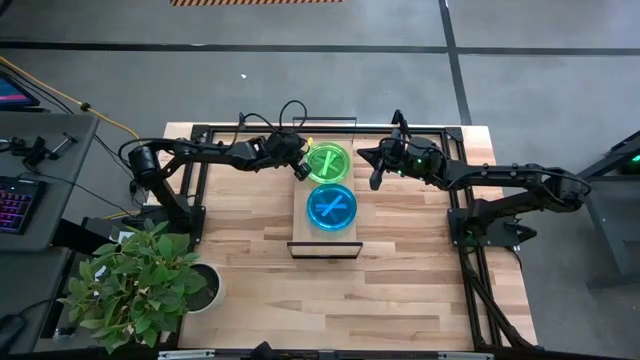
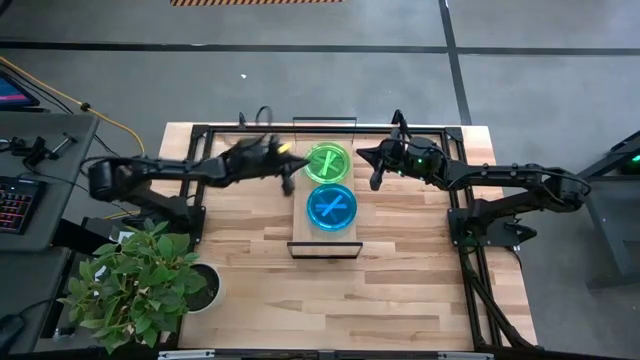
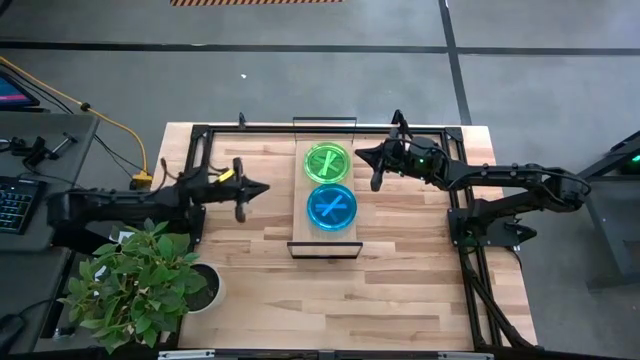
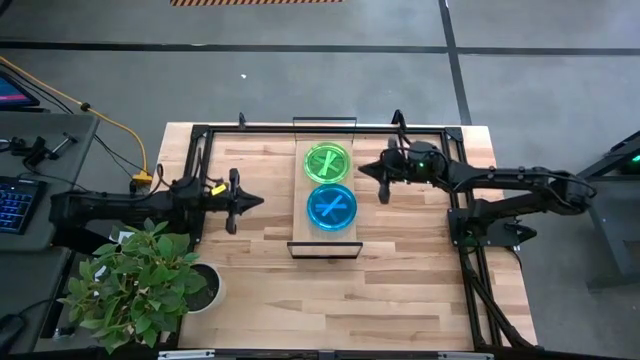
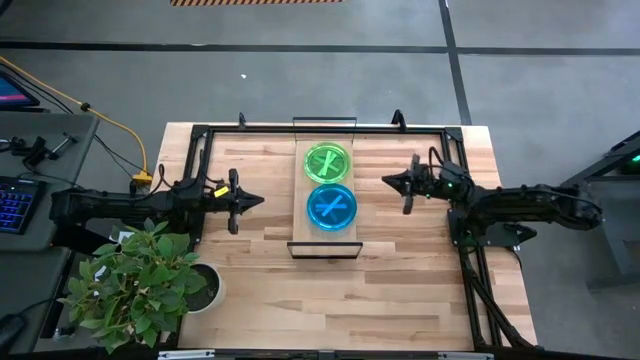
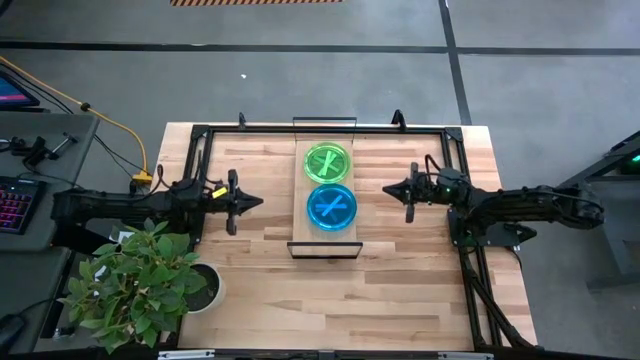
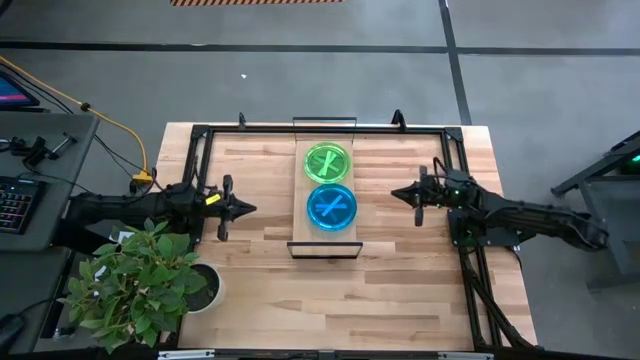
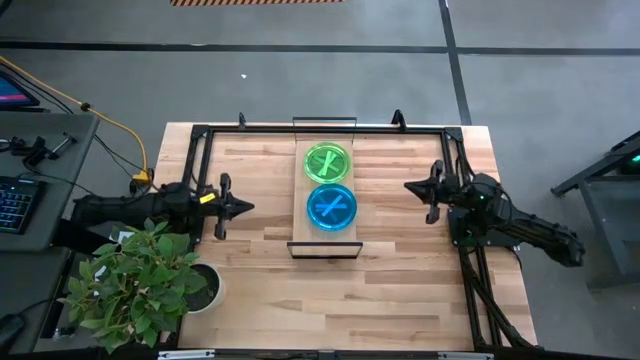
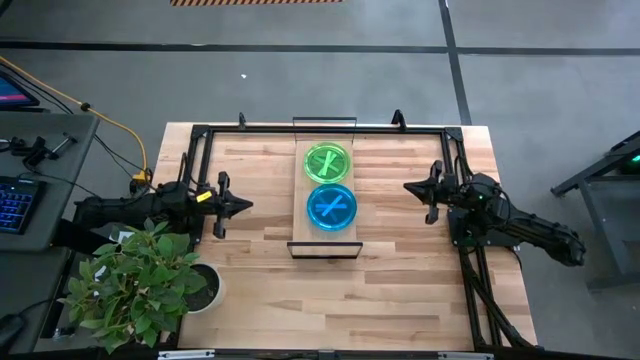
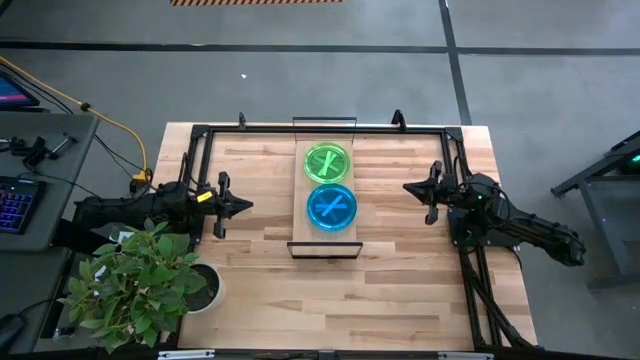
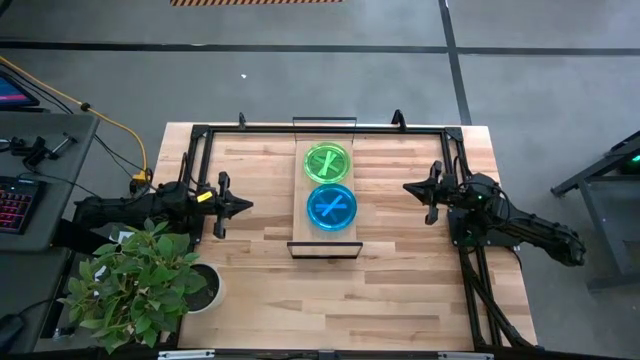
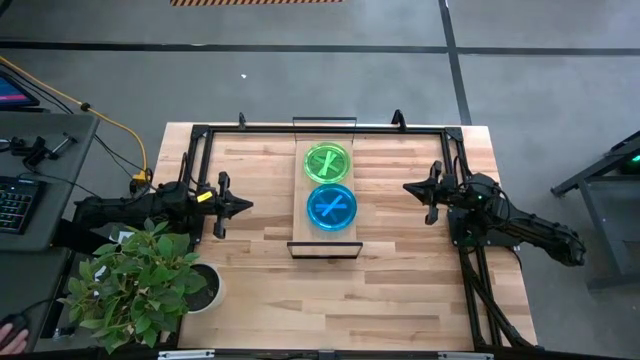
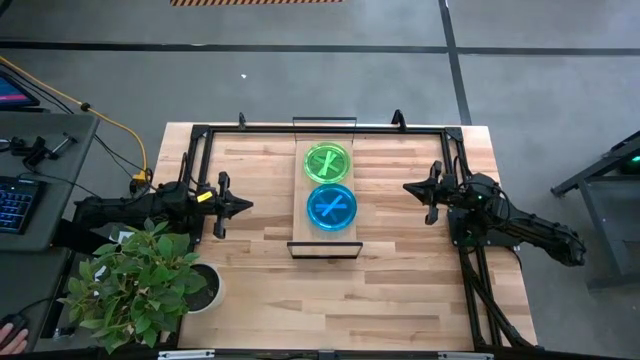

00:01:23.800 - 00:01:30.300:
Task: Place and stack plates onto a shelf
Return to Home Position

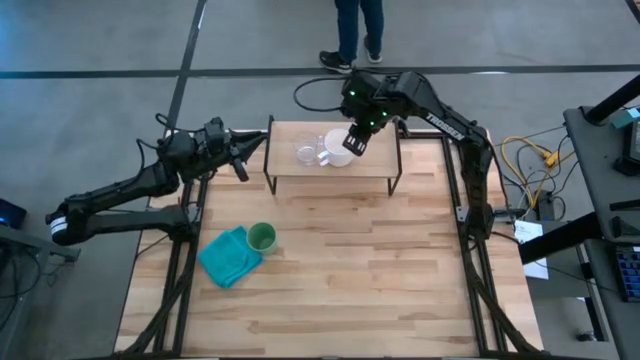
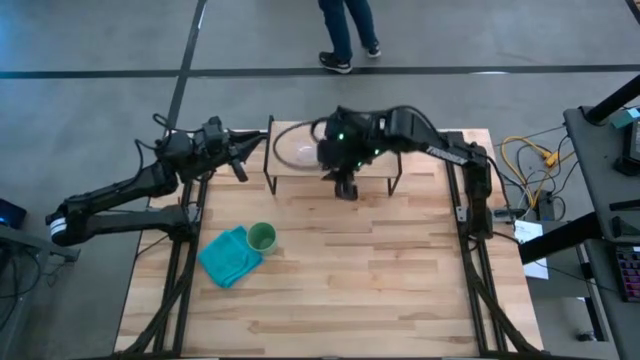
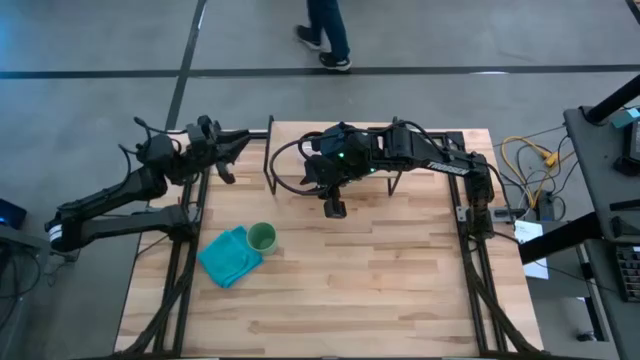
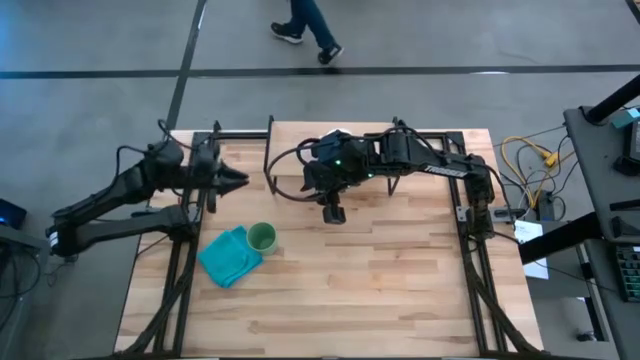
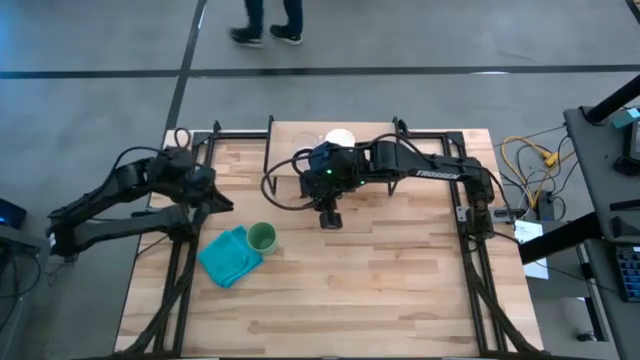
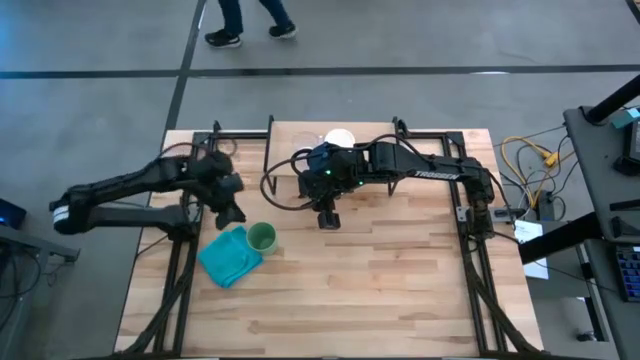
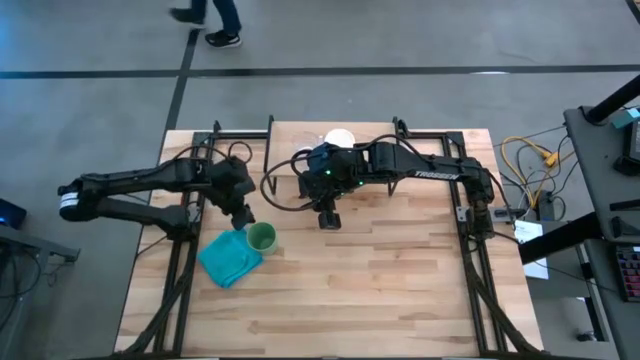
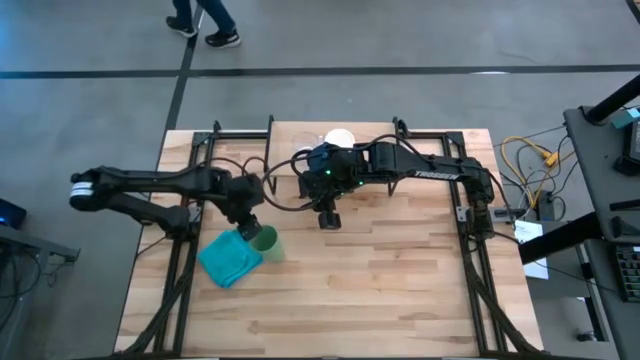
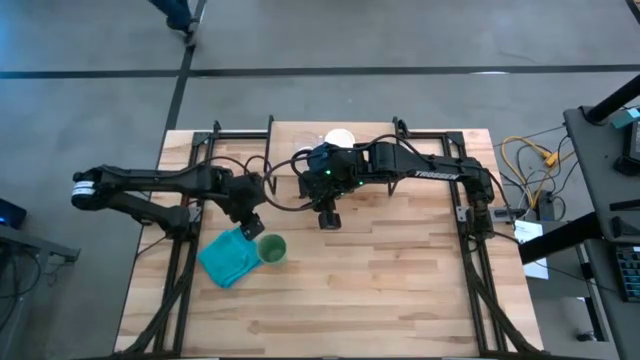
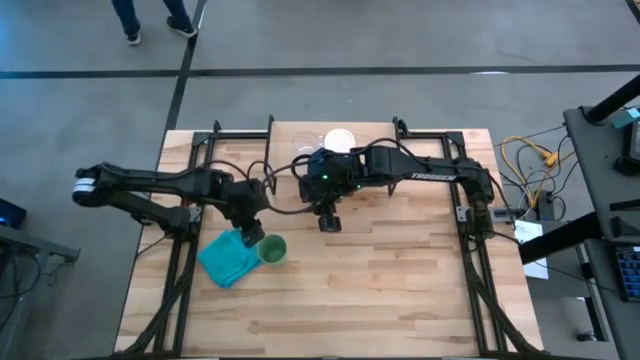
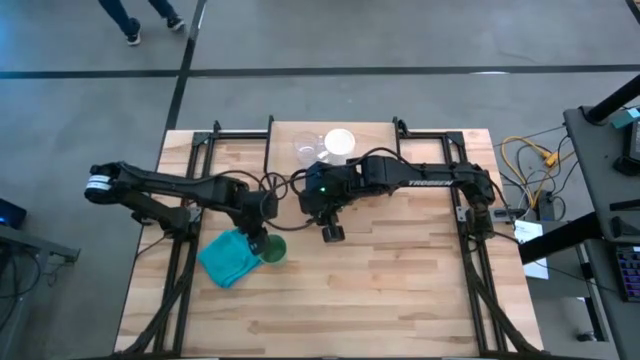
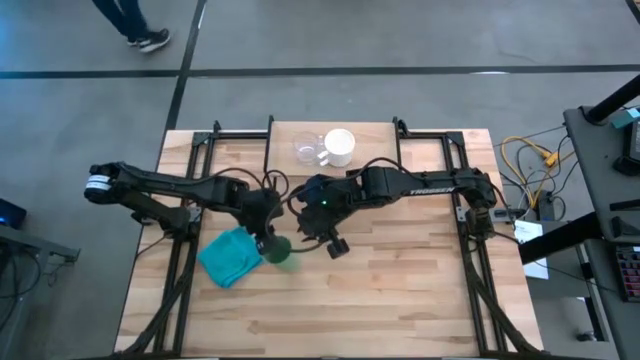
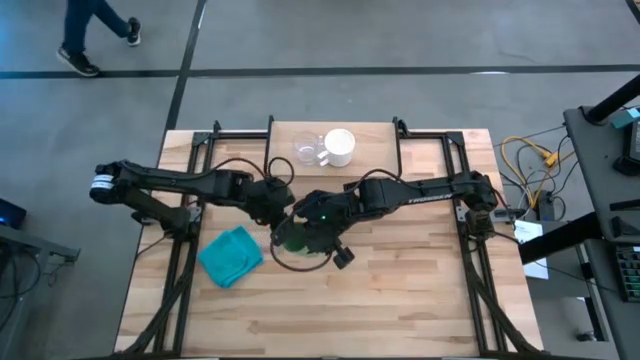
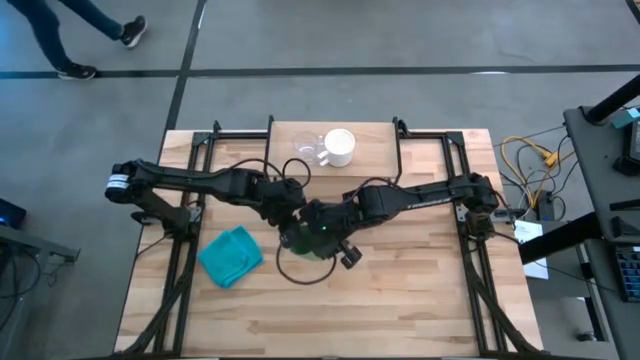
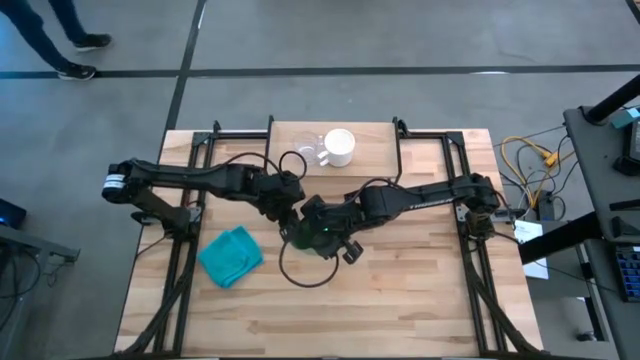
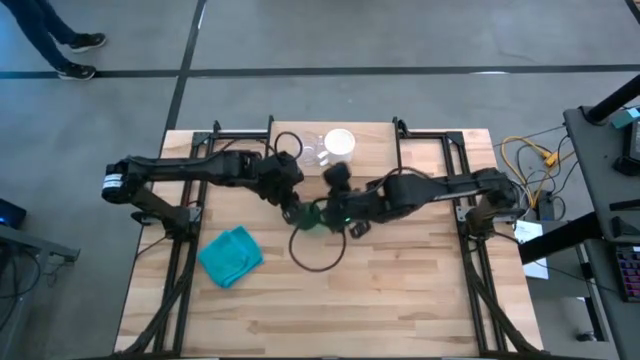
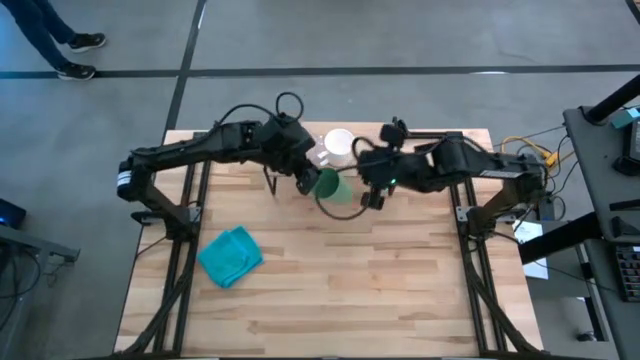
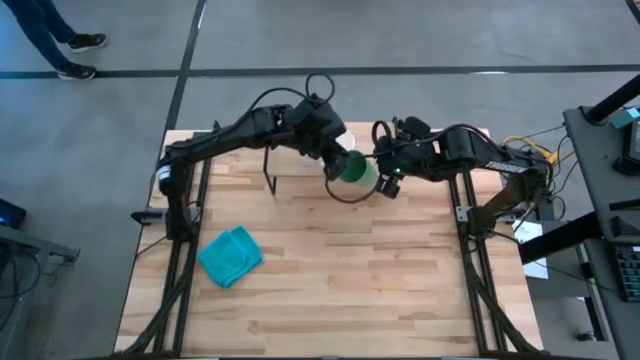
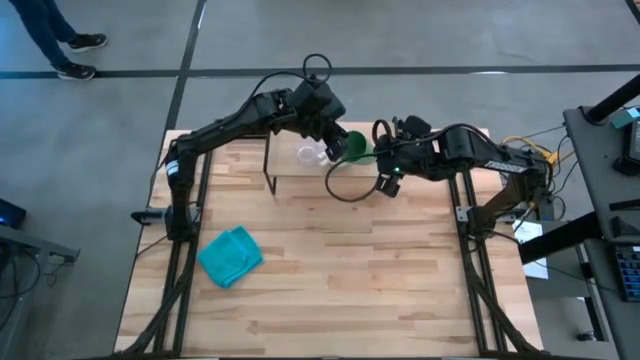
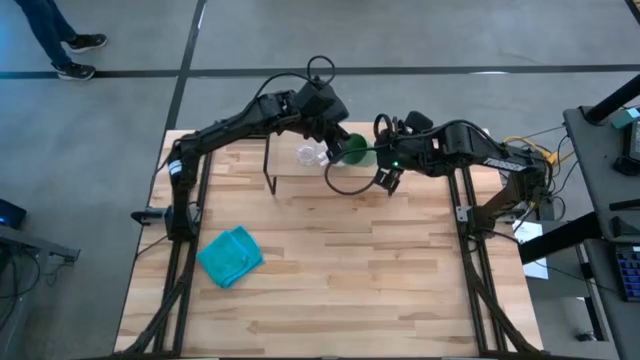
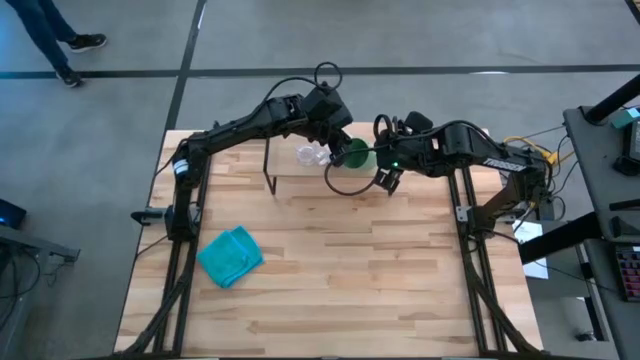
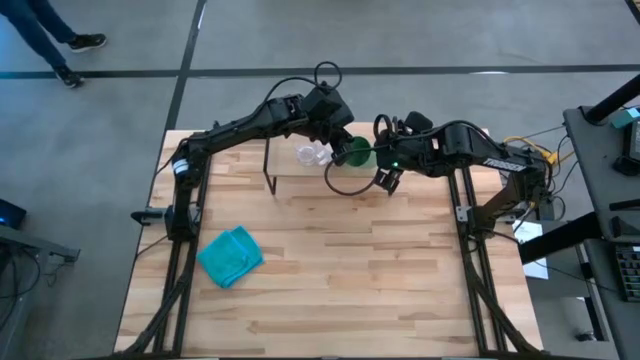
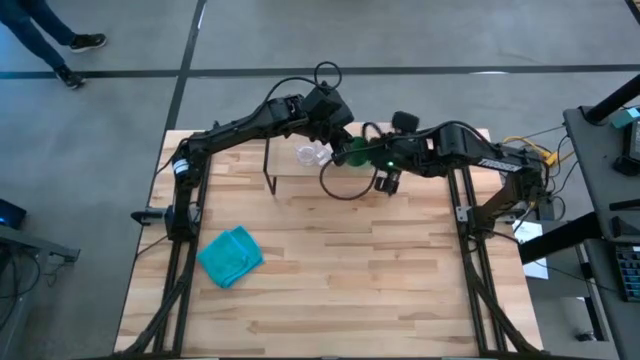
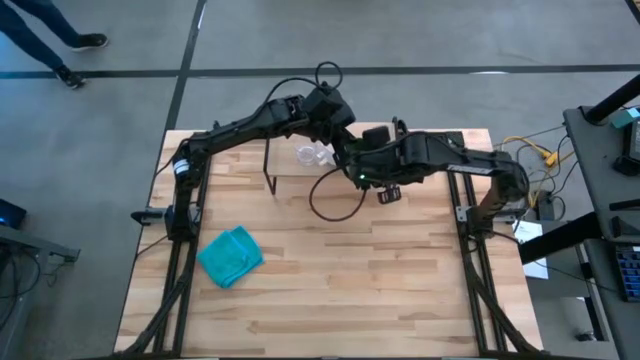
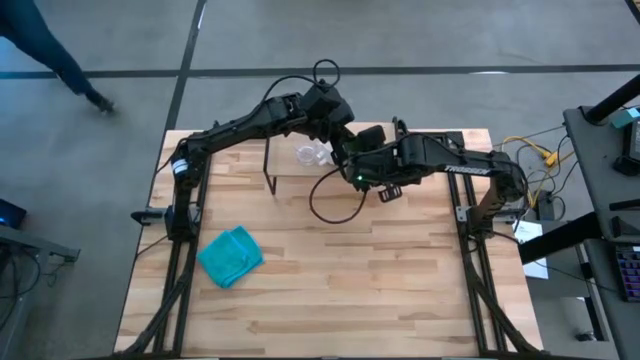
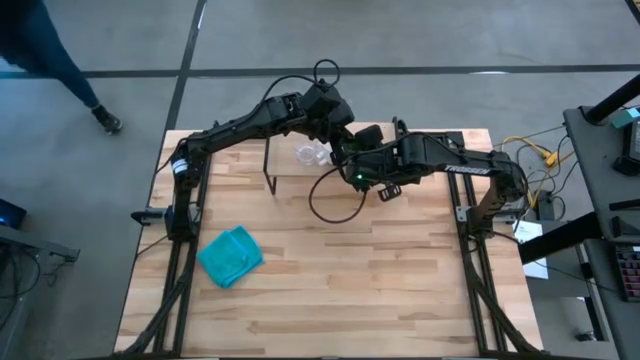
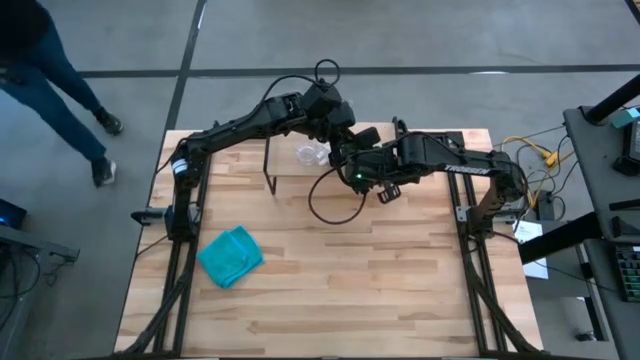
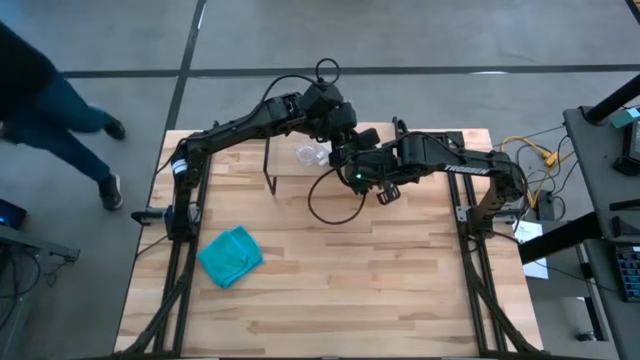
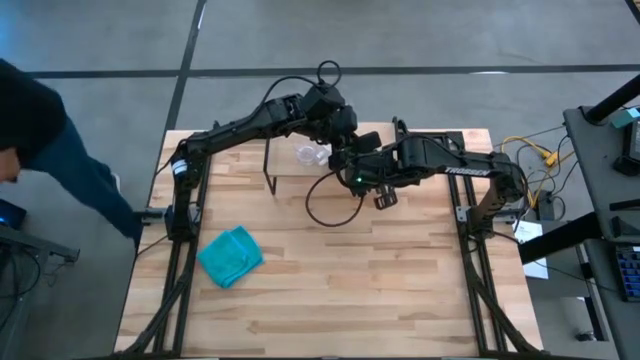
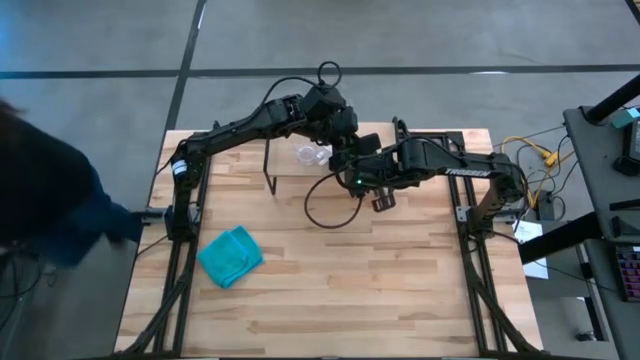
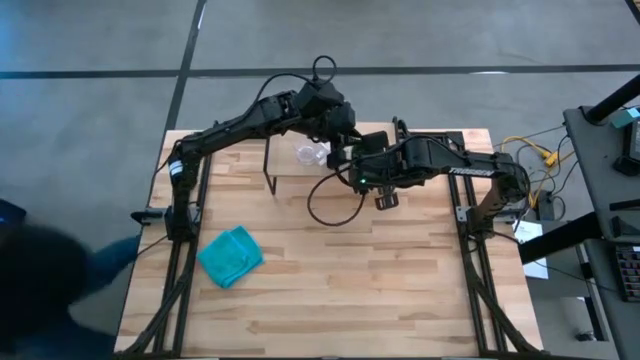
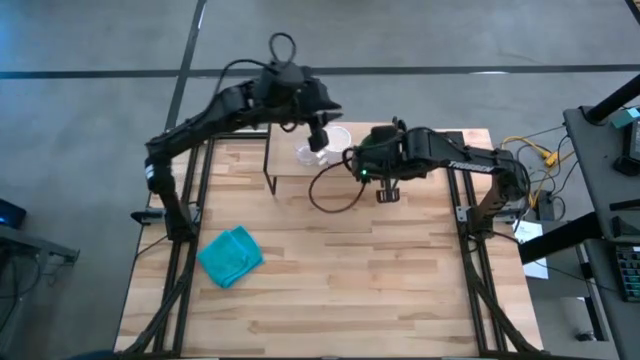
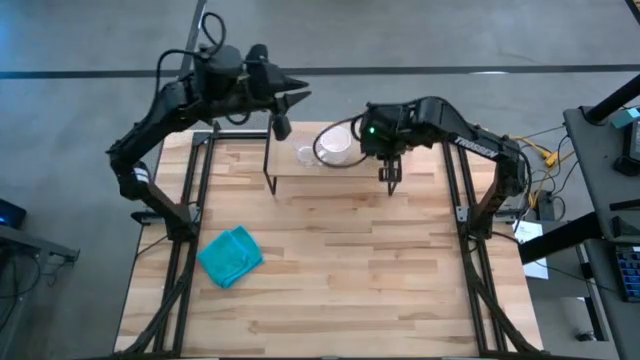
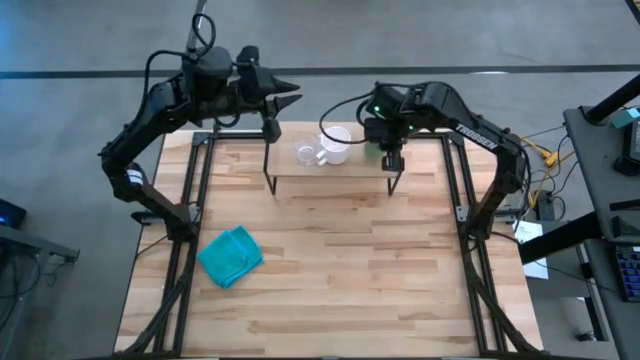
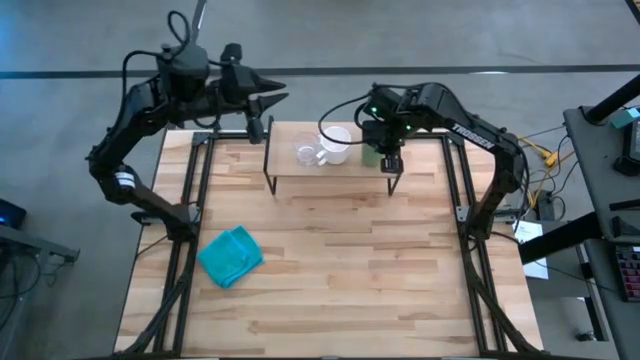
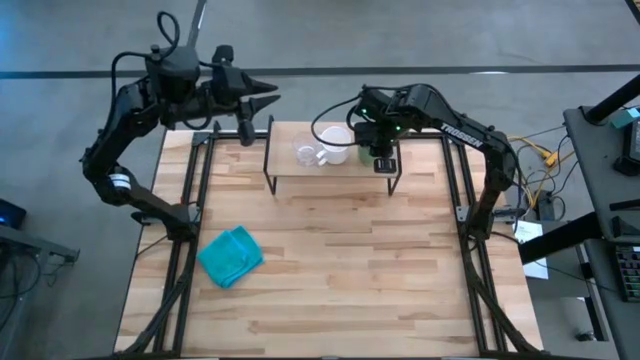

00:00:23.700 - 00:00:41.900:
Task: Stack small to large cups/mugs on shelf
Put the green cup on the shelf
